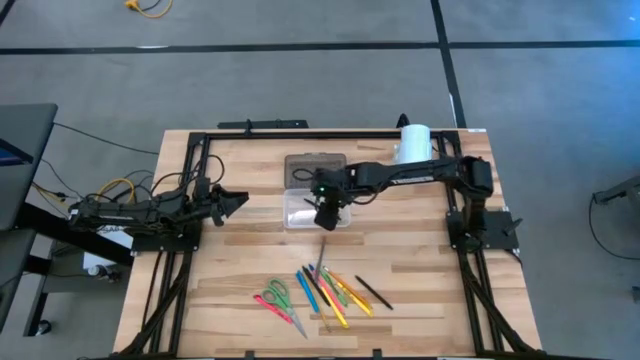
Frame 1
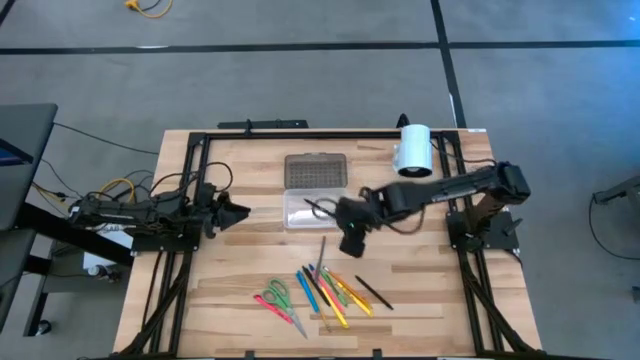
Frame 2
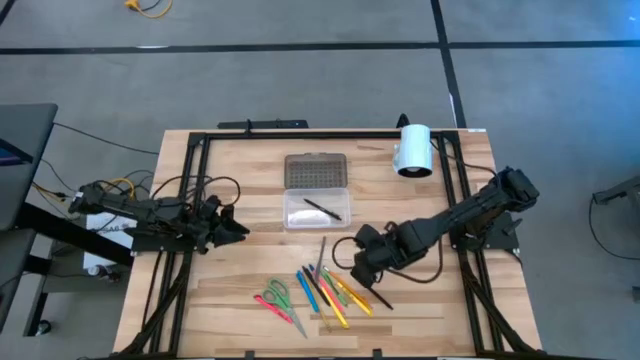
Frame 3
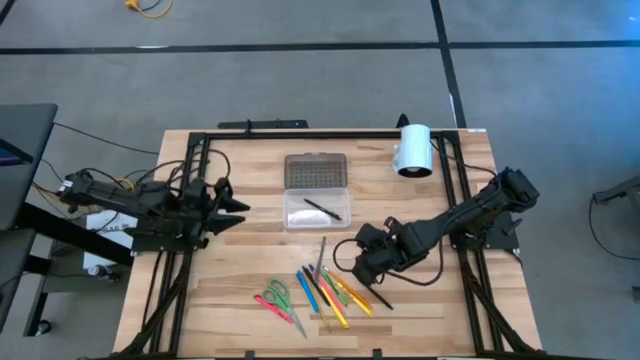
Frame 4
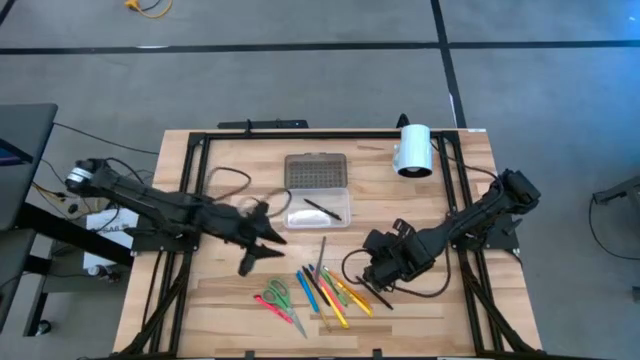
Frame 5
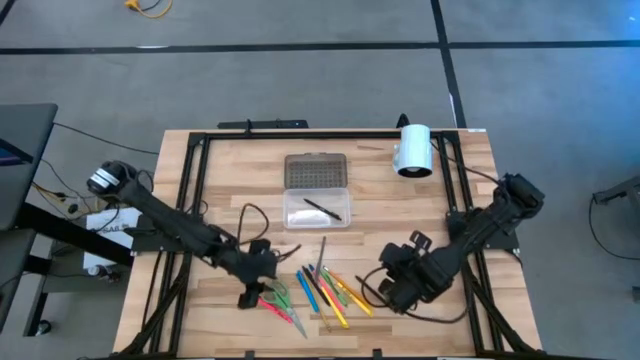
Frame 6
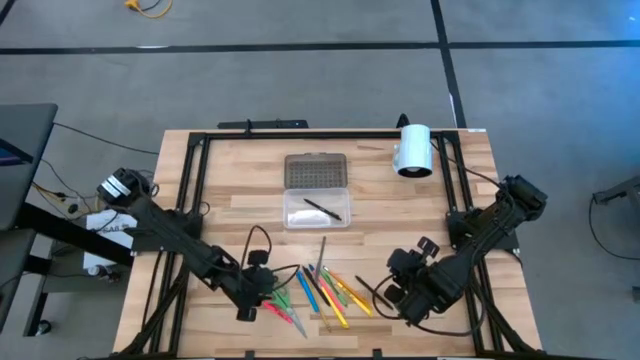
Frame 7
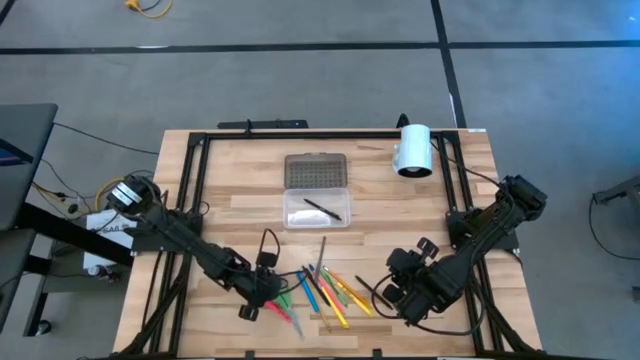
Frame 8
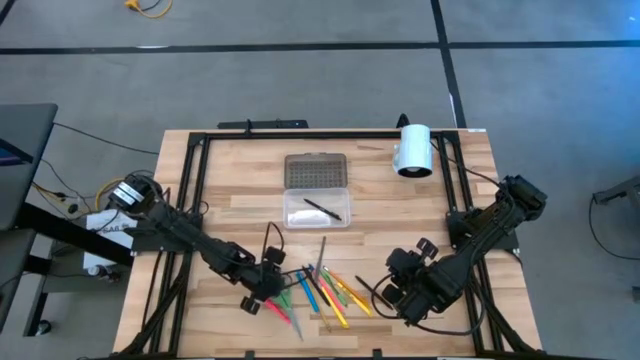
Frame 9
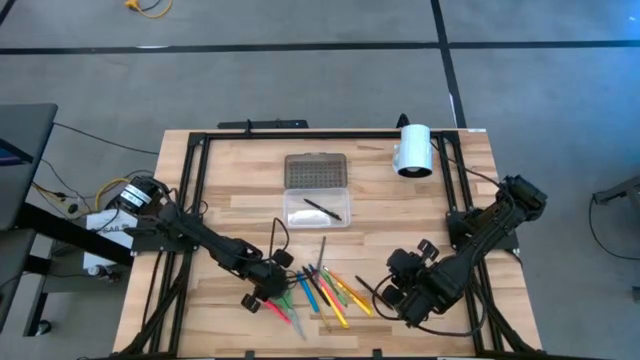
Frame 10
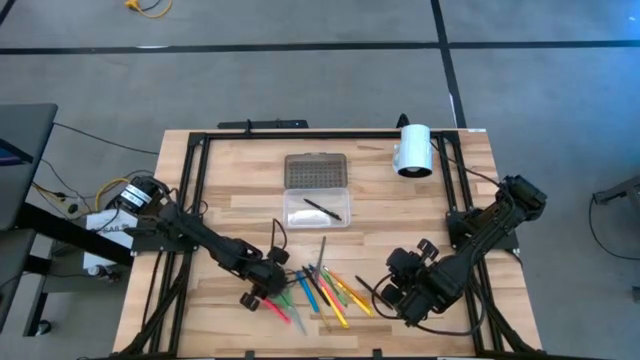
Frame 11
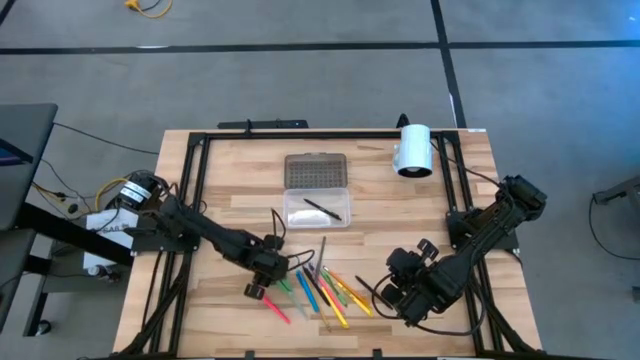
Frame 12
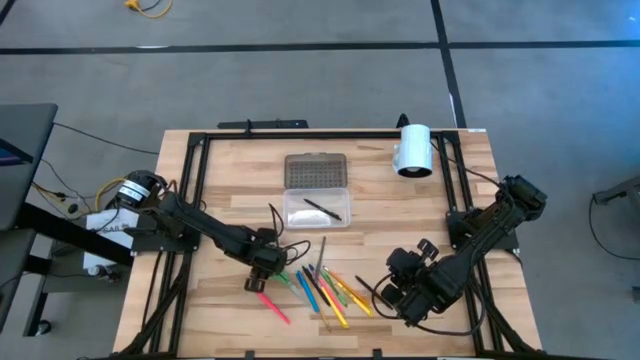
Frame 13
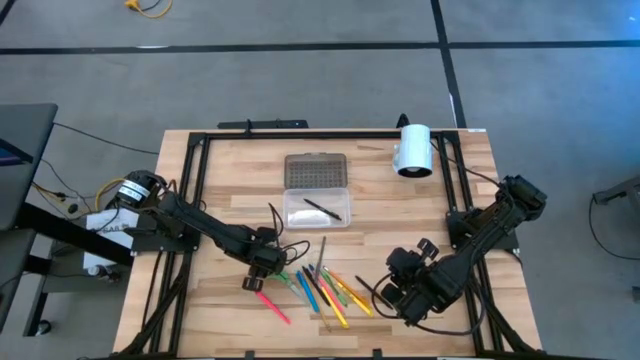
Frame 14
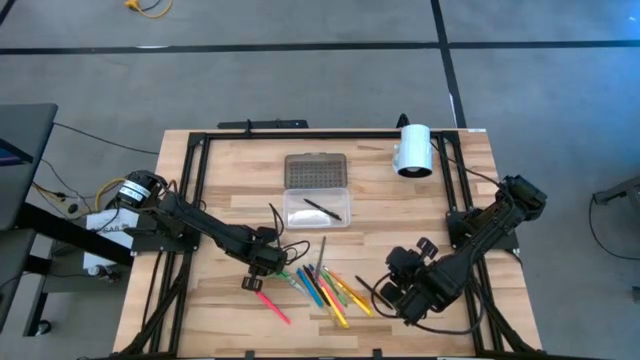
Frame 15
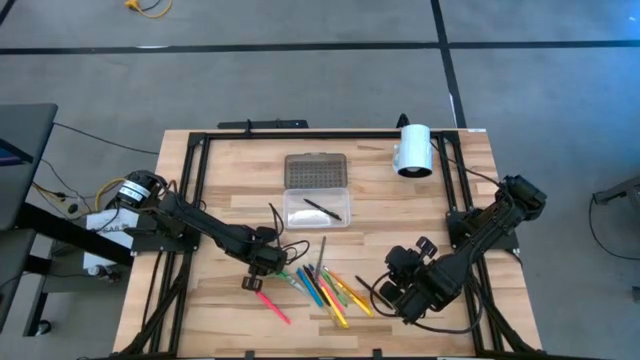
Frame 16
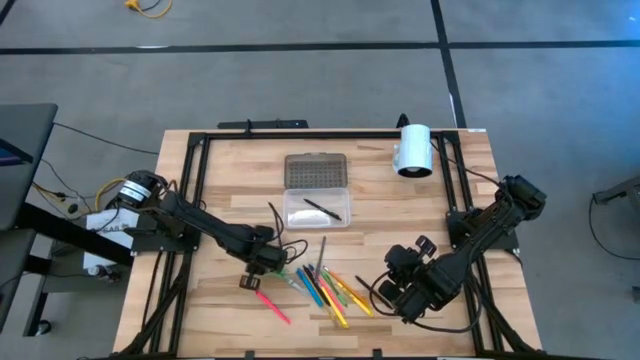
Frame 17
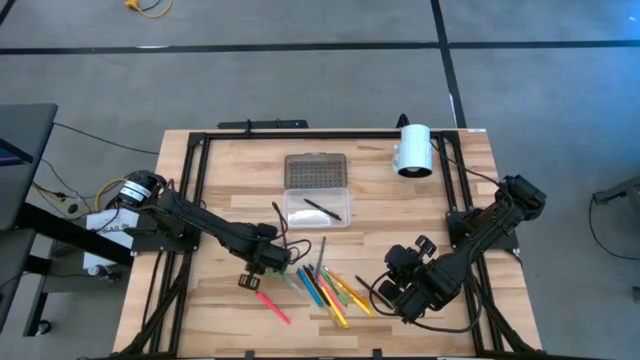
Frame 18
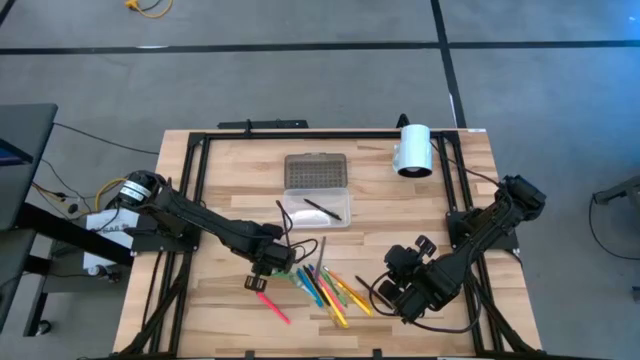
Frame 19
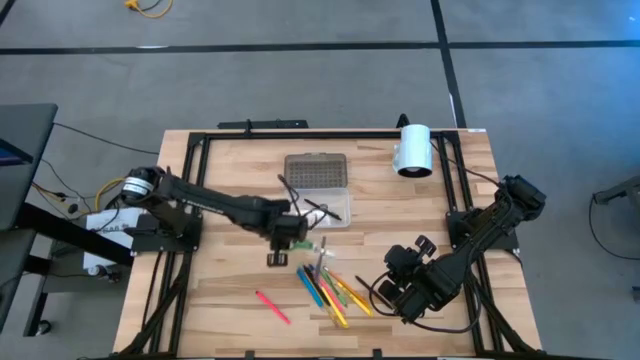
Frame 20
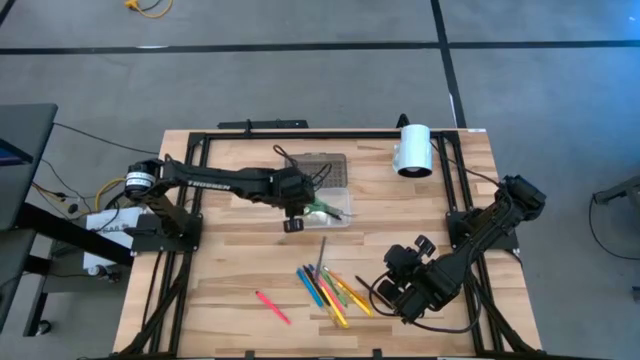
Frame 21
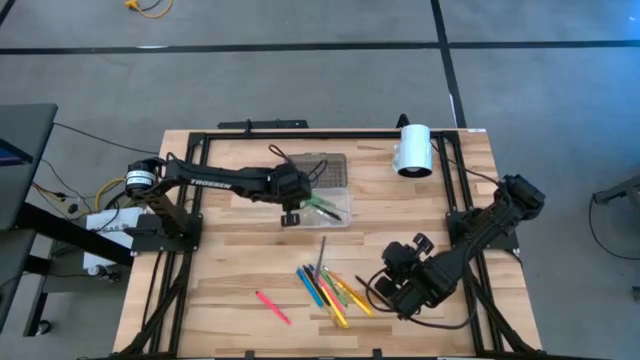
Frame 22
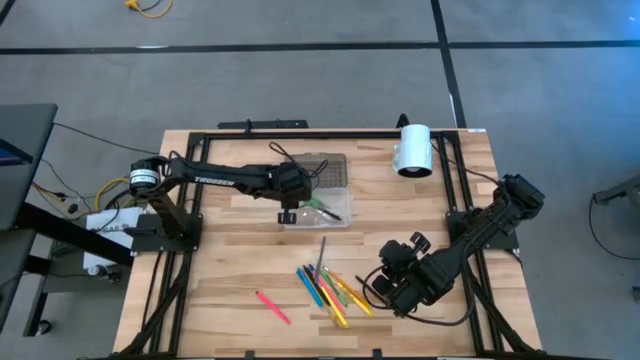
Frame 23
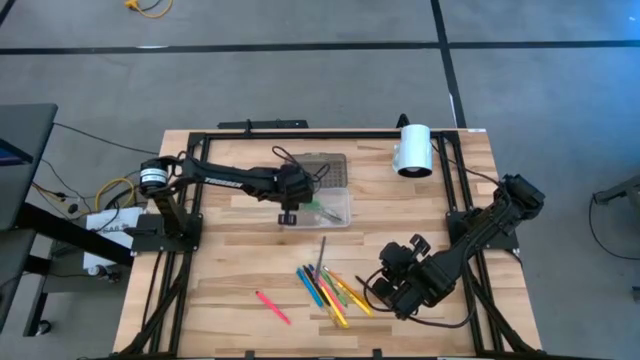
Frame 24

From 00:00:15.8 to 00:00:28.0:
Task: Pick & place school supplies into a supply box
Put the green scissors into the supply box

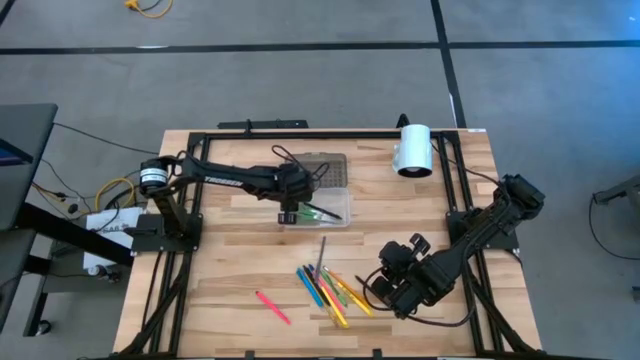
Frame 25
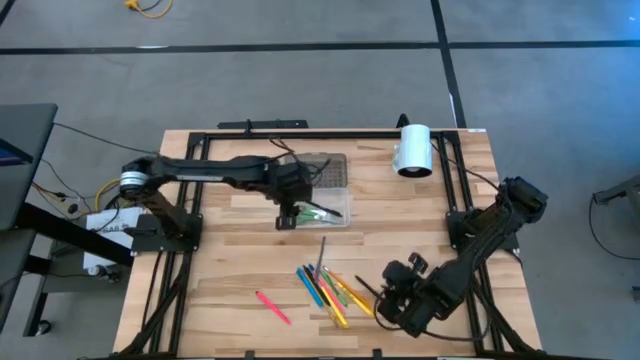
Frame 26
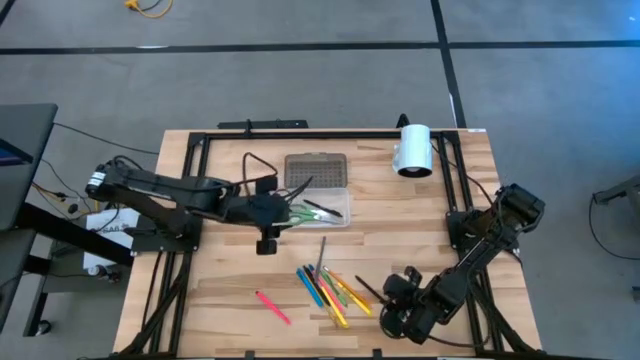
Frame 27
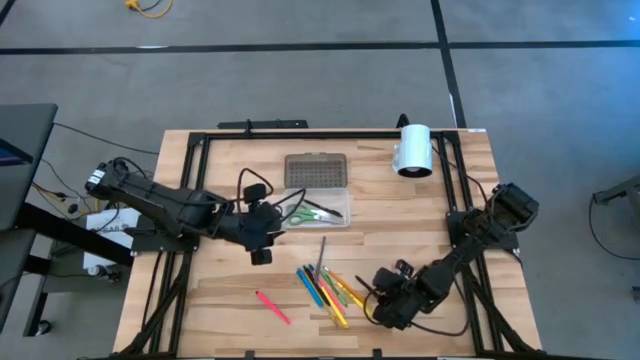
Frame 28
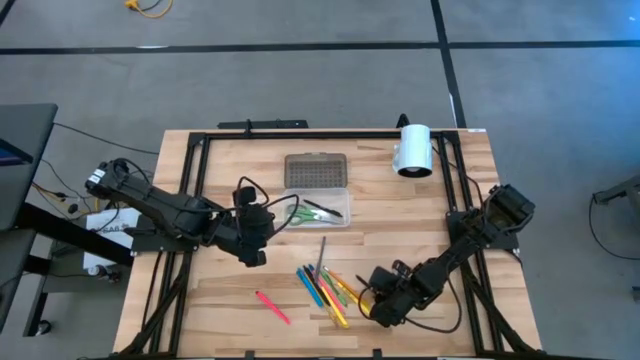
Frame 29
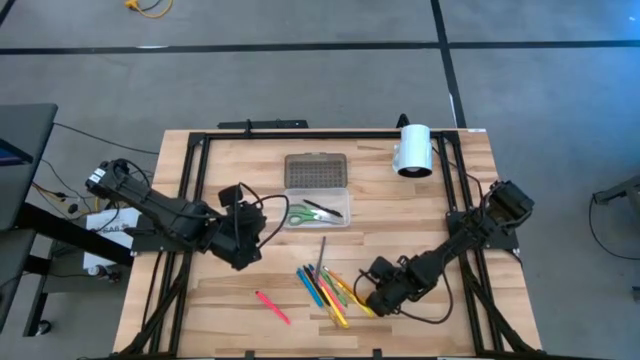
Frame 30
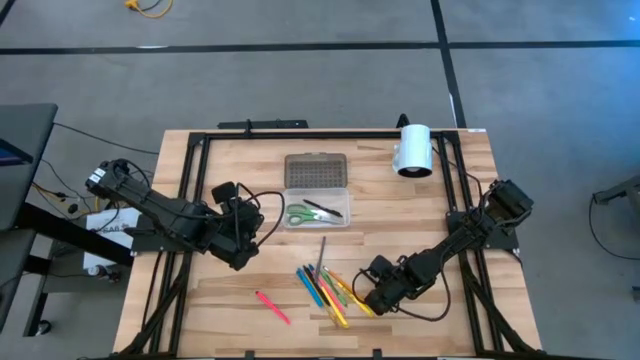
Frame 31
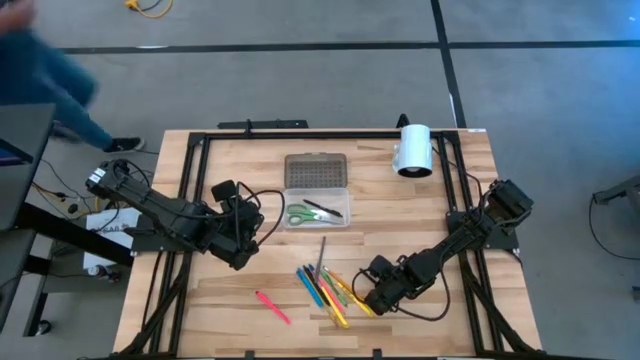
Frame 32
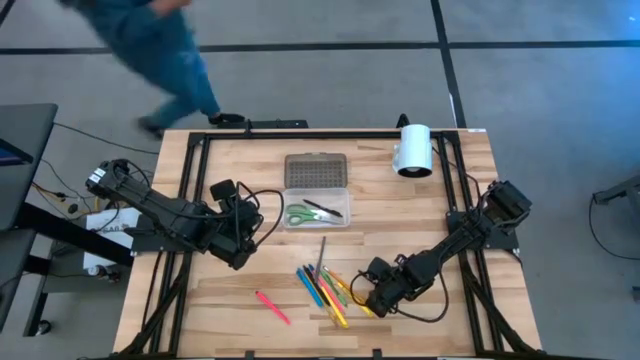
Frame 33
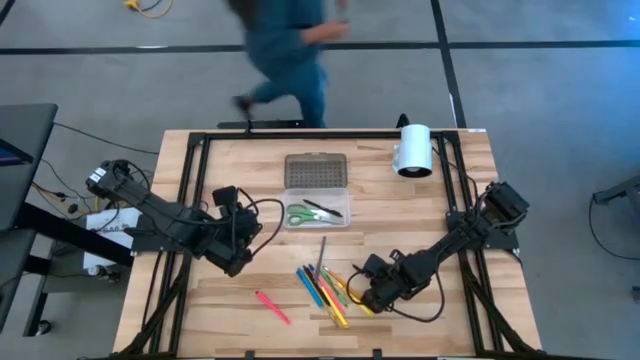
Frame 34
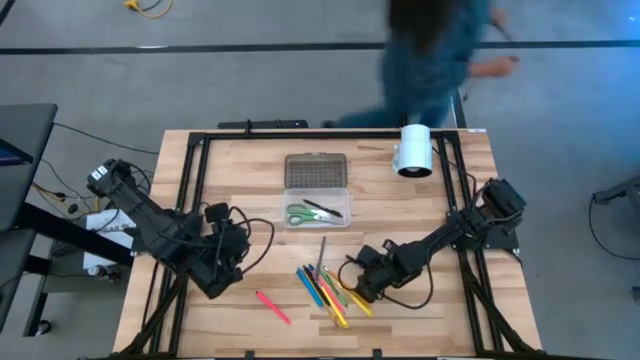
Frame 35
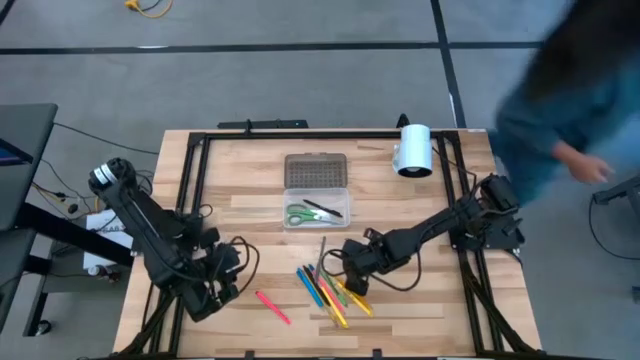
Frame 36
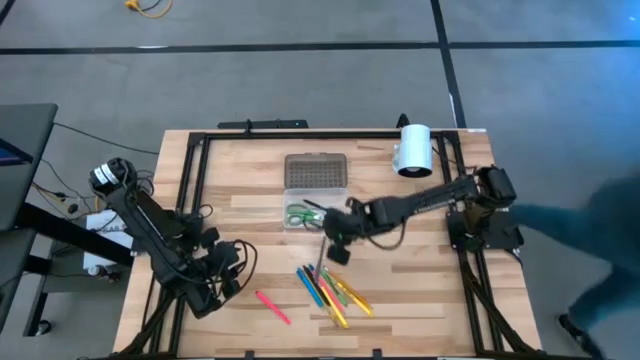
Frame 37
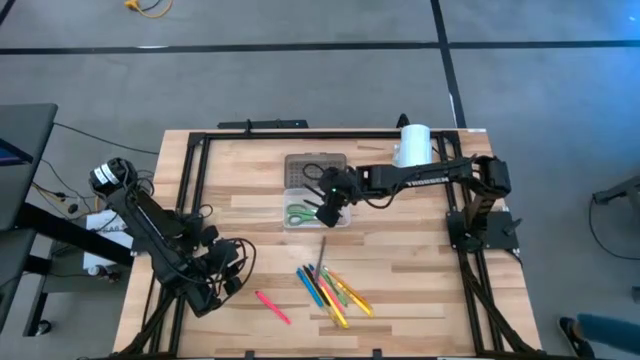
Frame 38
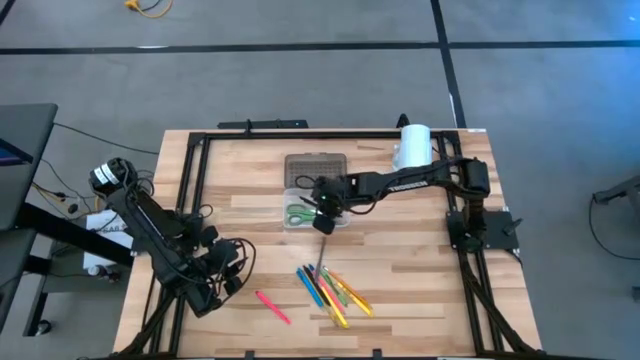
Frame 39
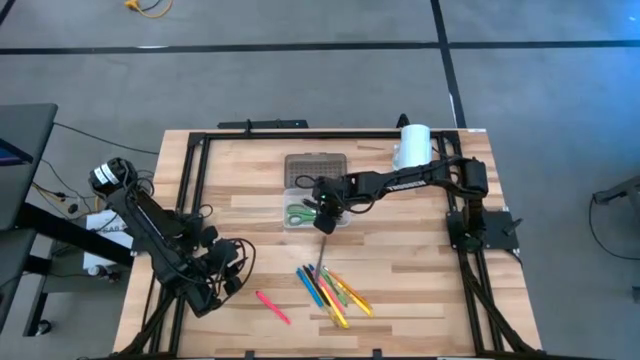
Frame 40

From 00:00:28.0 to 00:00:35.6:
Put the black pen into the supply box

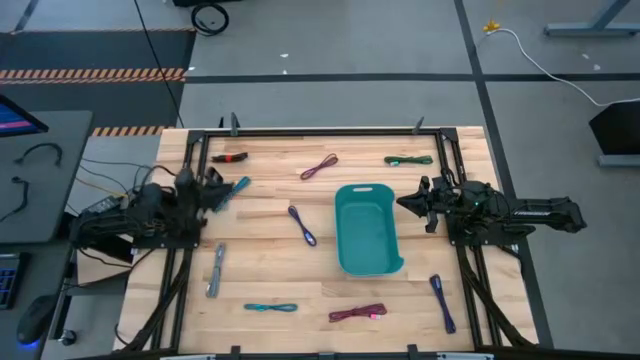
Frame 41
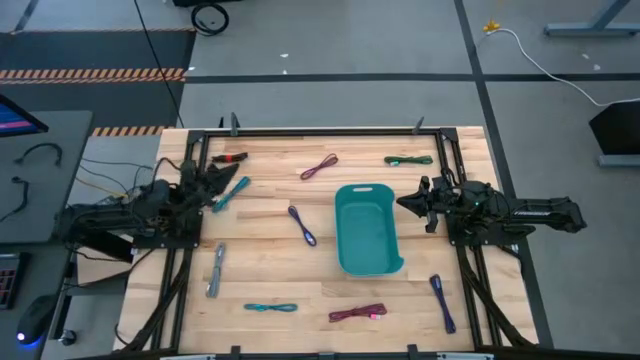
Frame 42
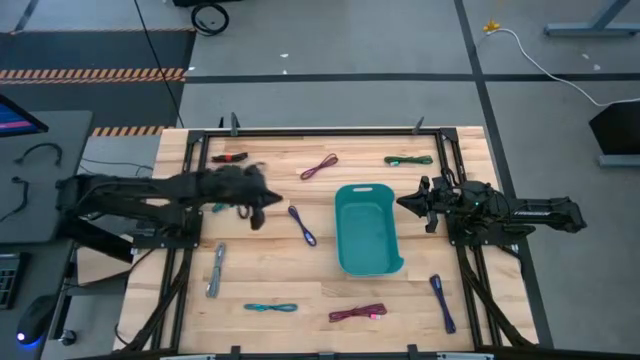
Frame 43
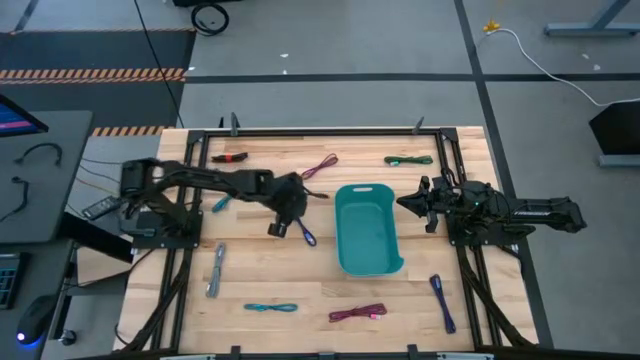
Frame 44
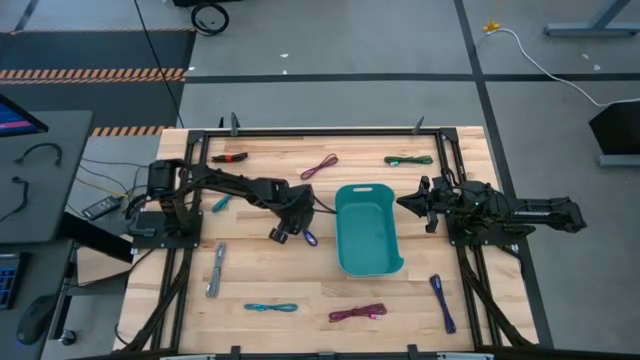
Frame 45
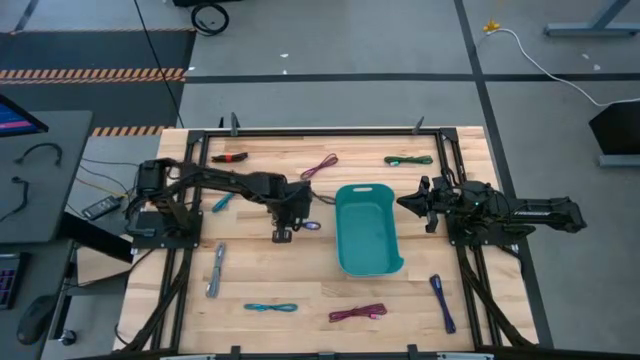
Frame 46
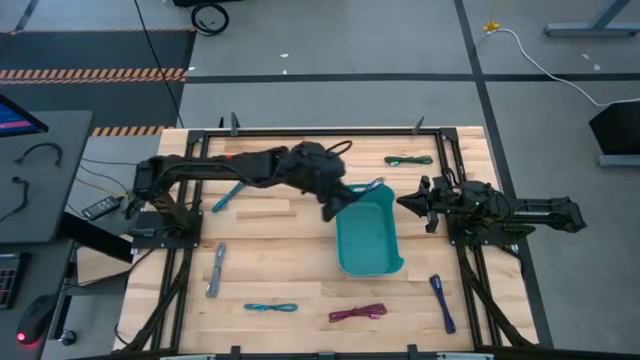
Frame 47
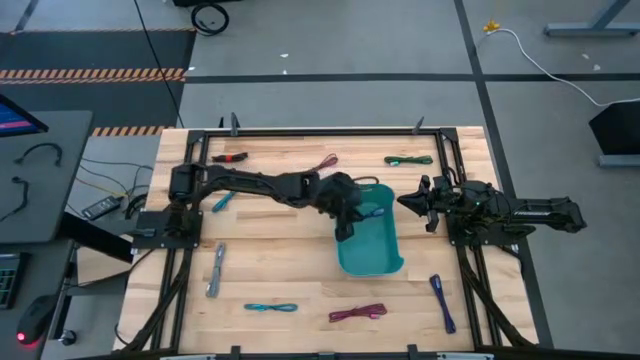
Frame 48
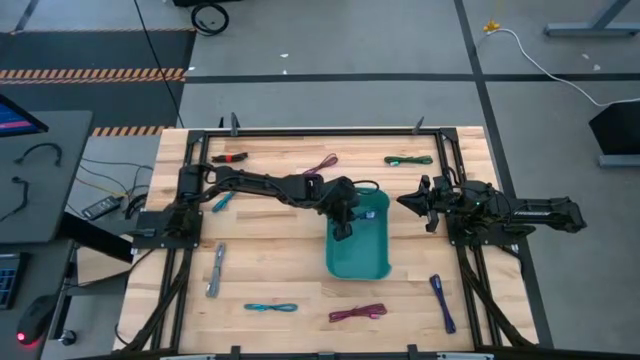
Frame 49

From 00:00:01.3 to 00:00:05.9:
Task: Pick and place USB-C Cables
Put the top blue USB cable into the light green bin
